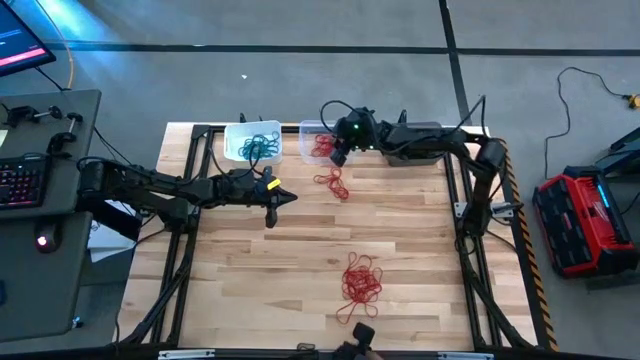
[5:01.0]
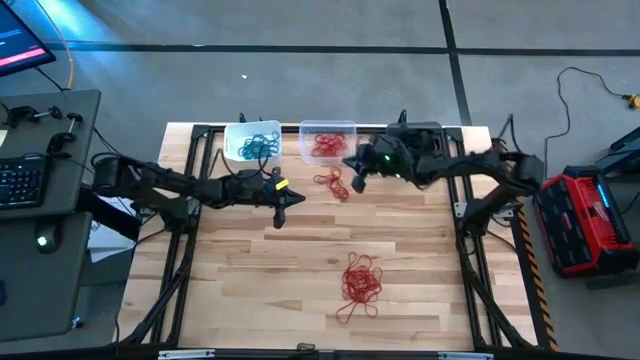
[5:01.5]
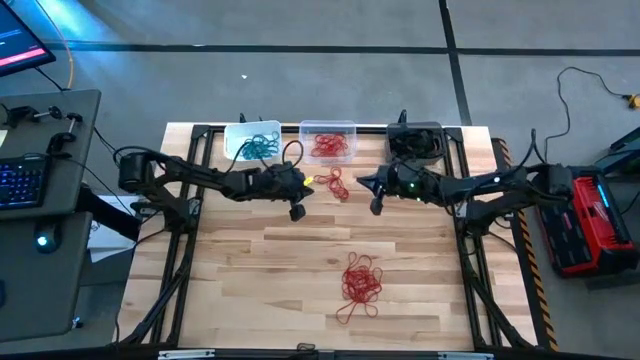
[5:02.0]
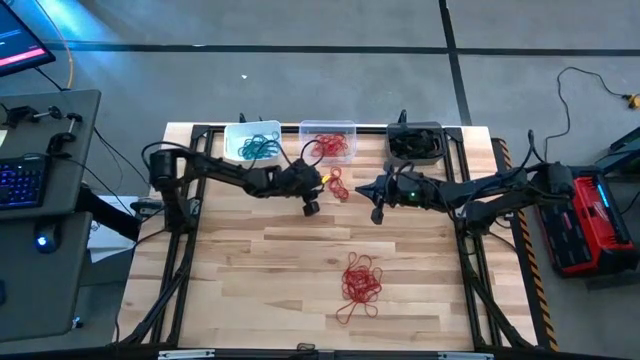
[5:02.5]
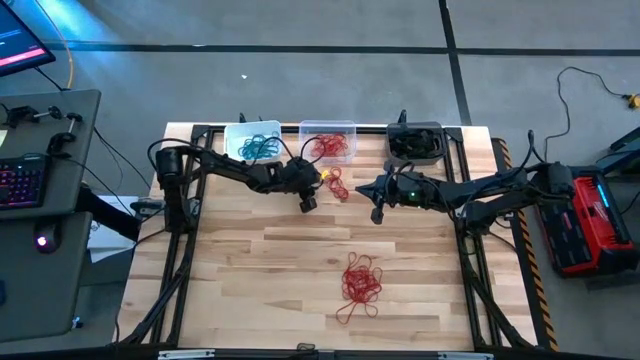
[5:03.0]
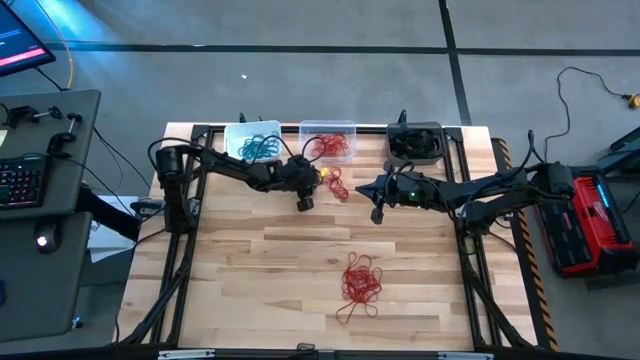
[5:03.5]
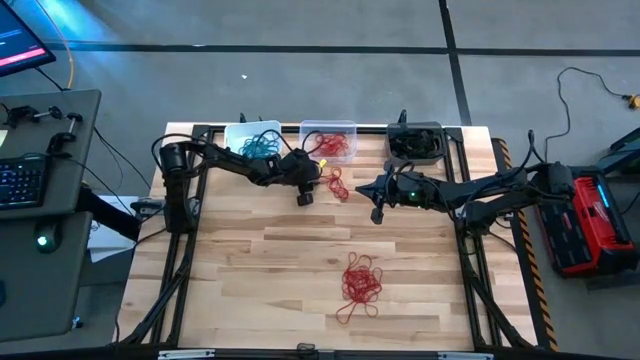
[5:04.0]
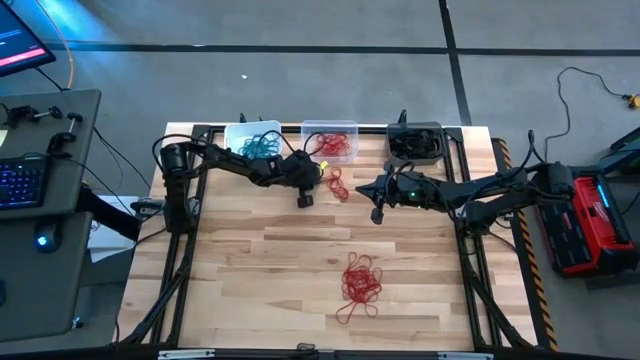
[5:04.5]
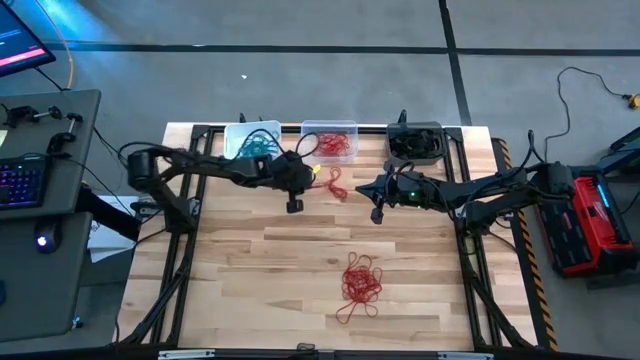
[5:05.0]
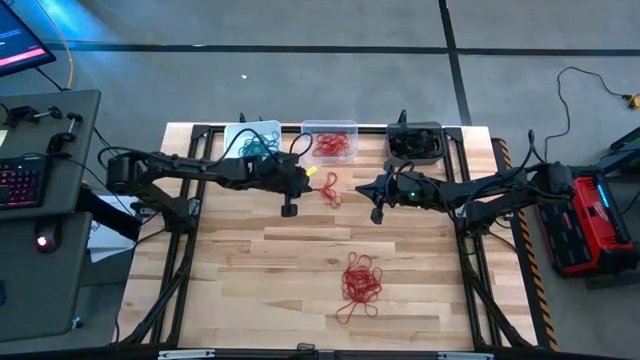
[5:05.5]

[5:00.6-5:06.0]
Task: Sort rubber bands into baskets
Put the red rubber band into the transparent bin

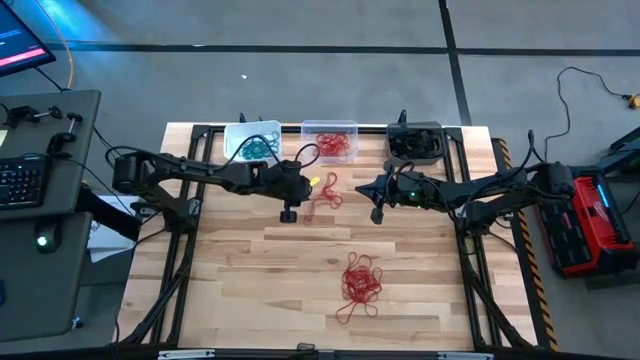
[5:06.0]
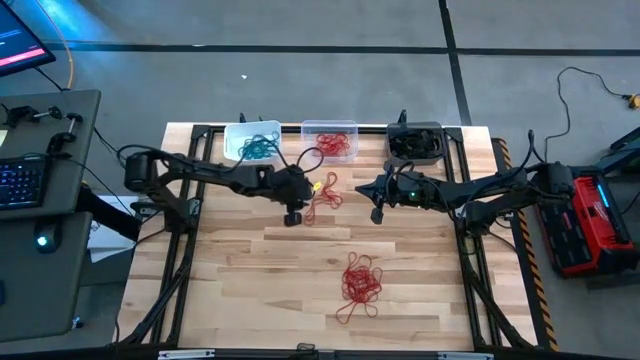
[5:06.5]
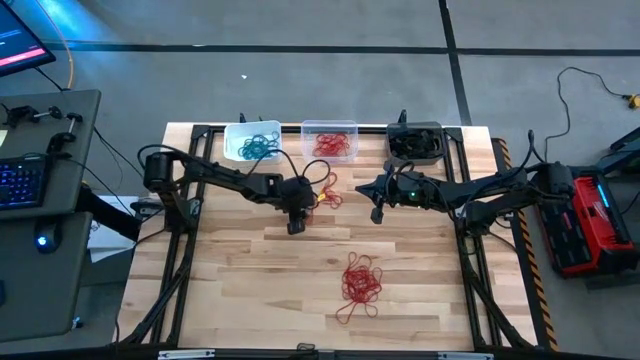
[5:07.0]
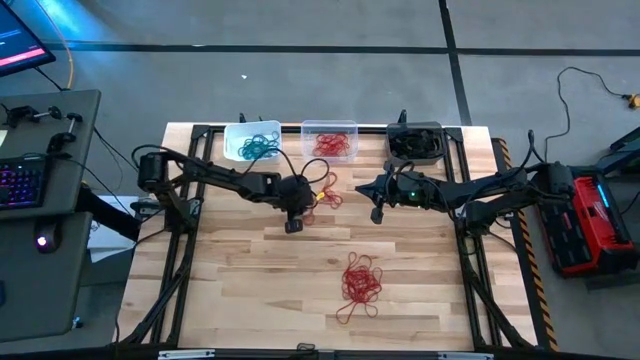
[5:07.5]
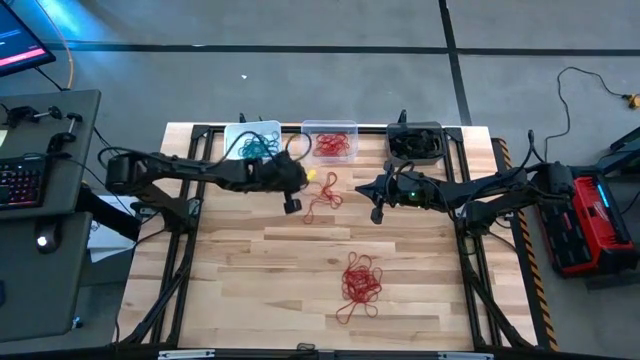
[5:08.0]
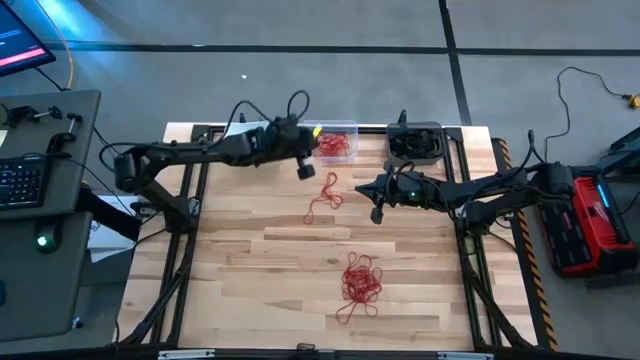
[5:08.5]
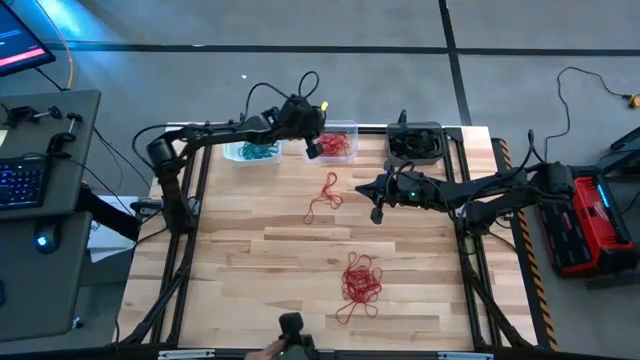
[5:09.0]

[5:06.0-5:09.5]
Put the red rubber band into the transparent bin

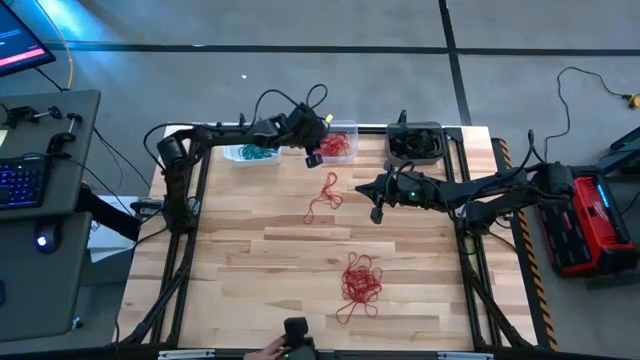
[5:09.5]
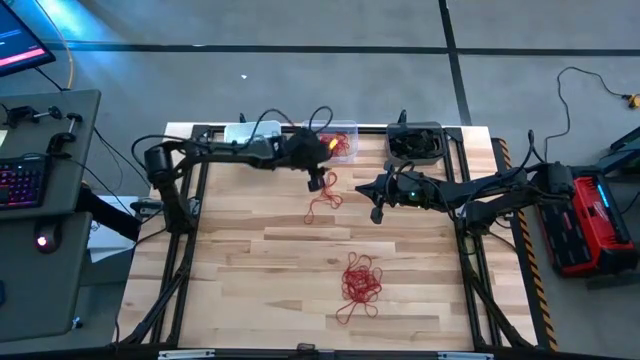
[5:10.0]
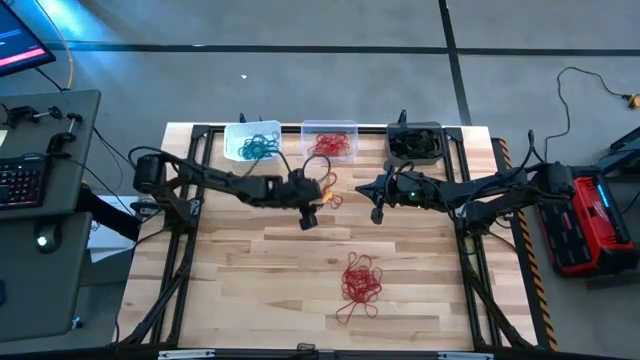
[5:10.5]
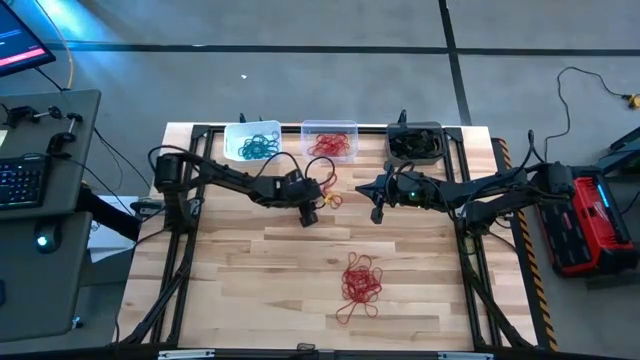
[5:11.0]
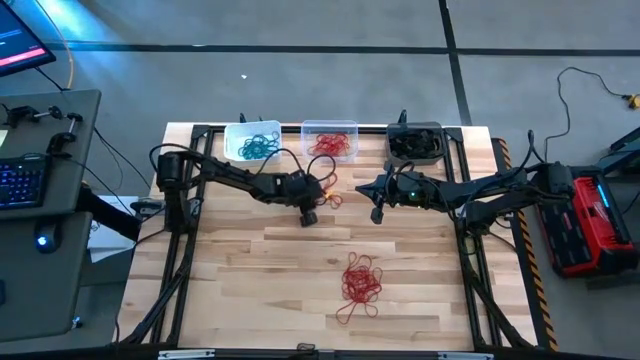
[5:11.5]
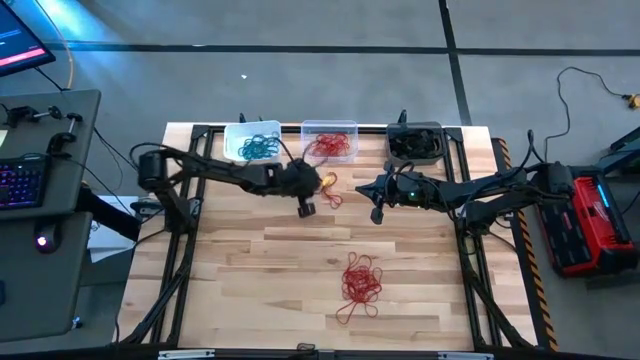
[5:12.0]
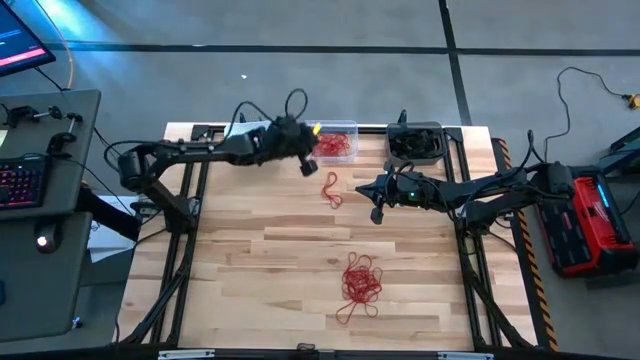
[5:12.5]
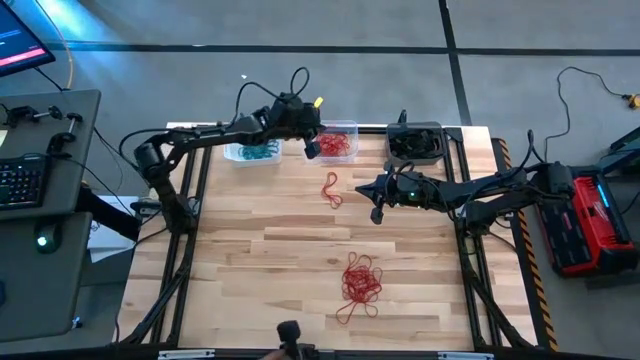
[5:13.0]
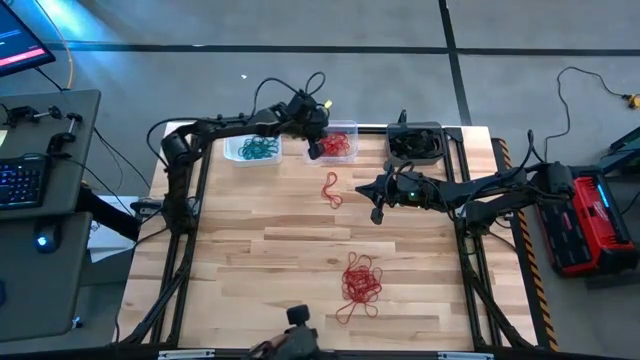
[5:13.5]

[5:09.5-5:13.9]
Put the red rubber band into the transparent bin

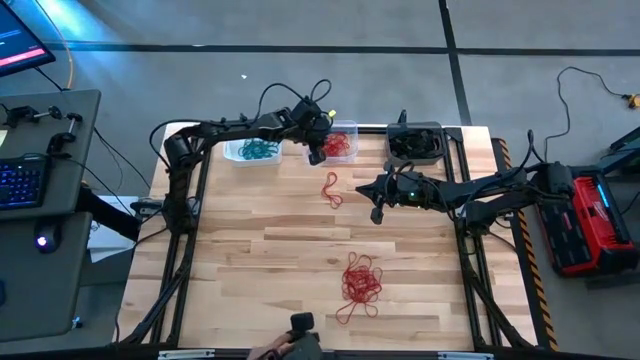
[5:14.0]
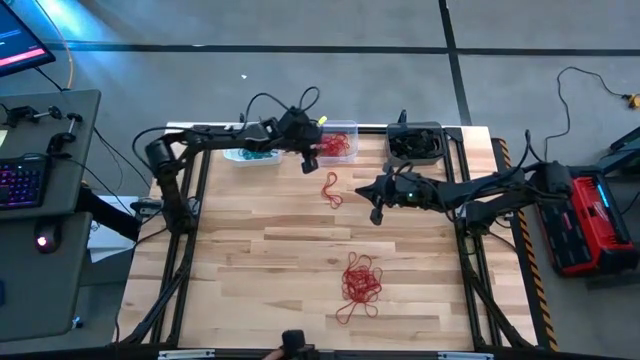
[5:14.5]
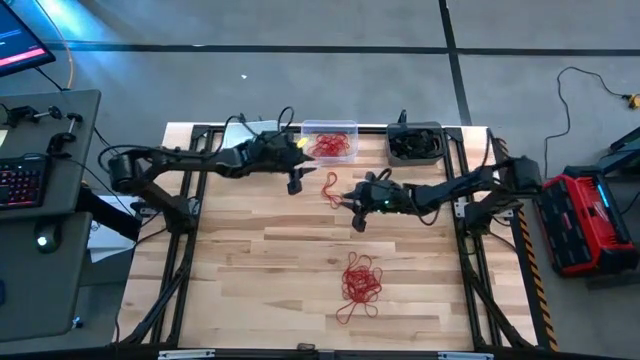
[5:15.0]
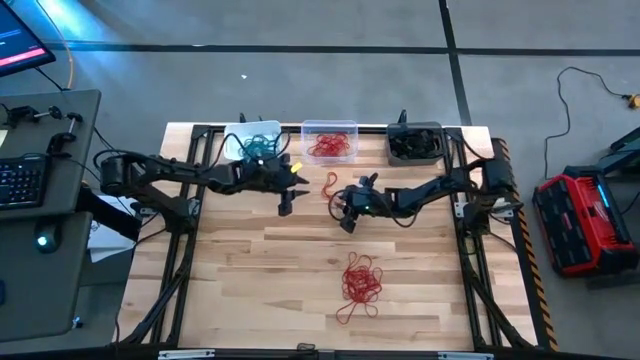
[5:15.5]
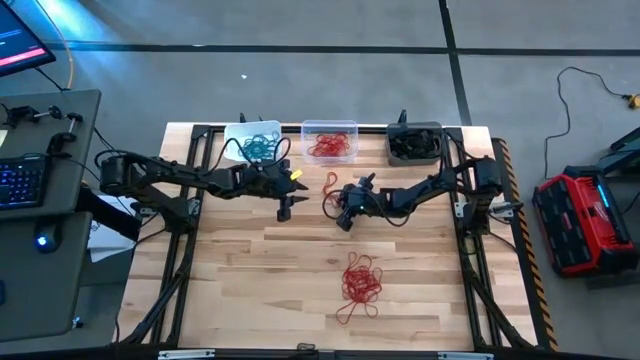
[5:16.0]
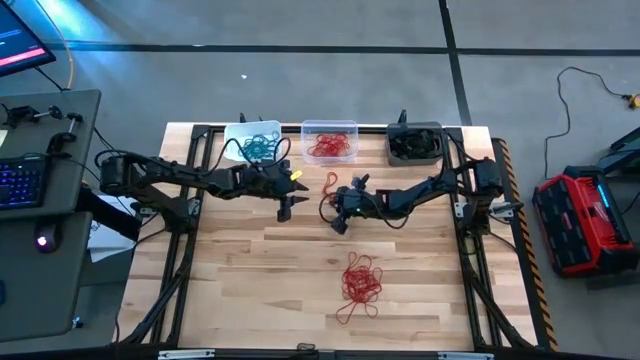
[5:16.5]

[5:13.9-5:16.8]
Put the red rubber band into the transparent bin

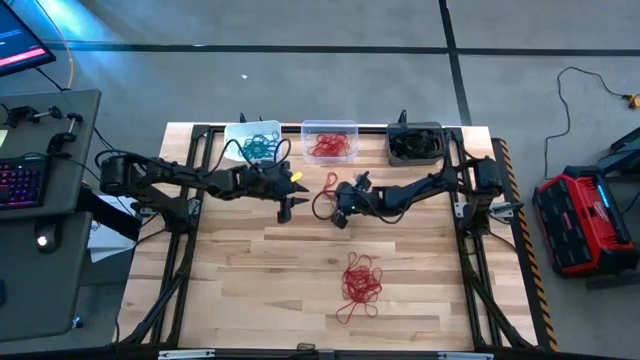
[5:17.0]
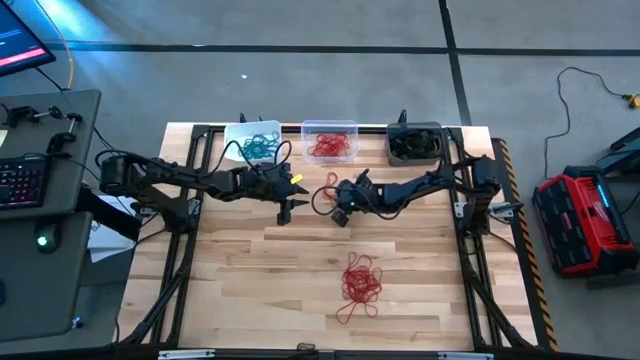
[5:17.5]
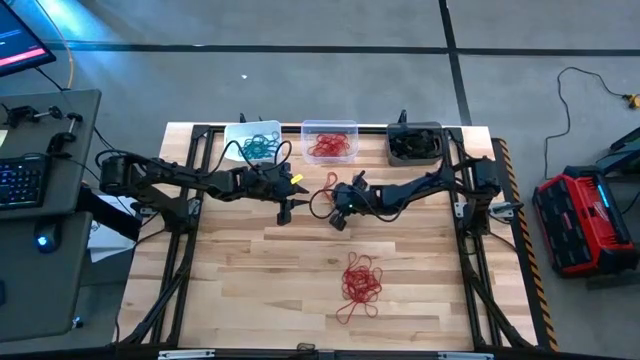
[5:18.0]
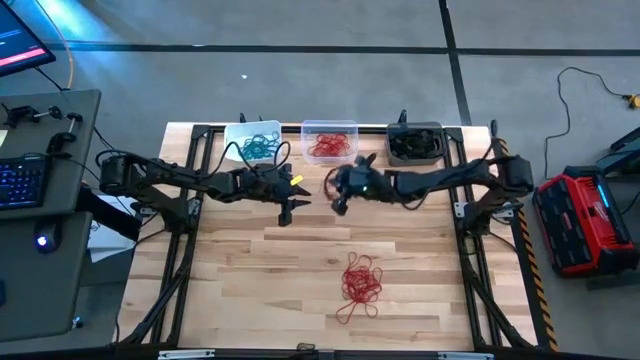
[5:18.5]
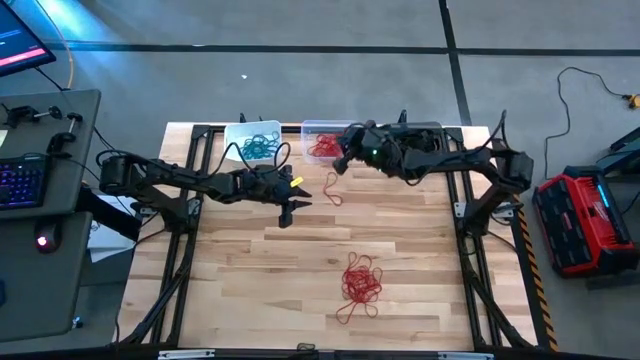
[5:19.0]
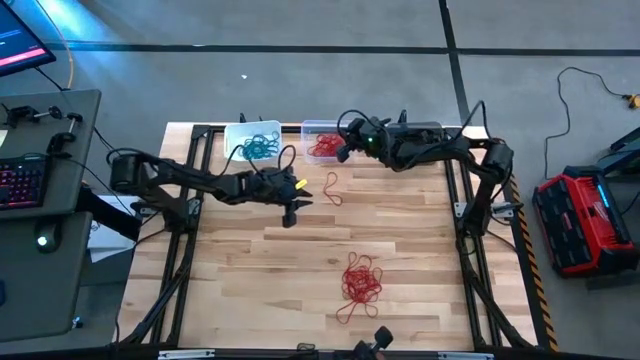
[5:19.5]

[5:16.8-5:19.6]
Put the red rubber band into the transparent bin

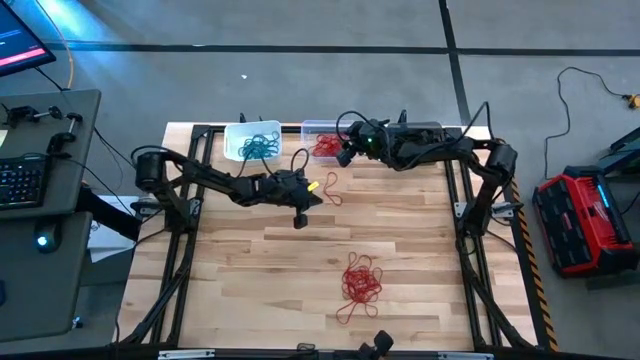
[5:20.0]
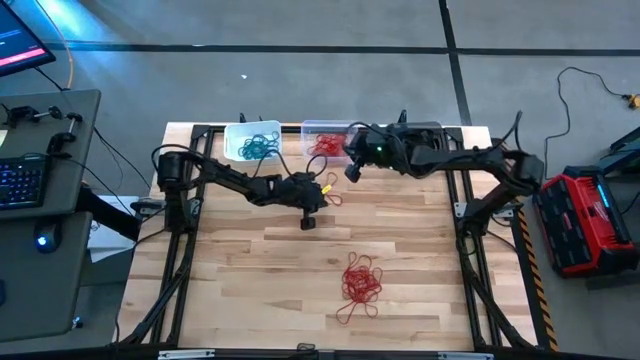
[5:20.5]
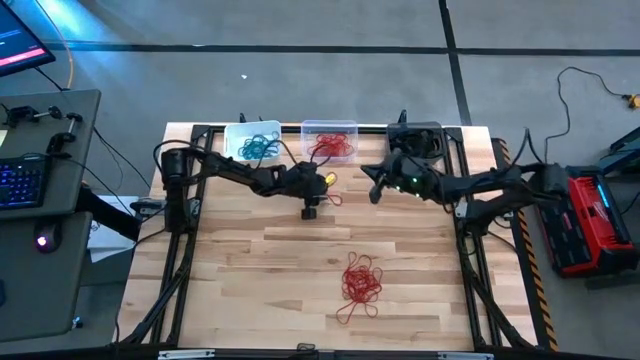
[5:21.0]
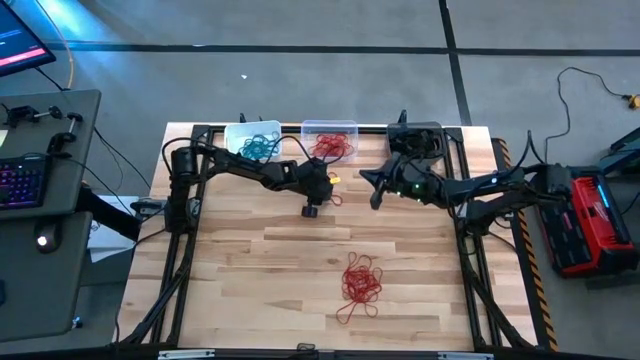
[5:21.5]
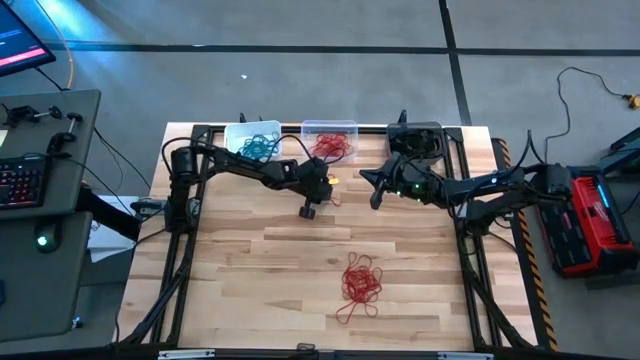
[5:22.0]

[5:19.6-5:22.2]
Put the red rubber band into the transparent bin
